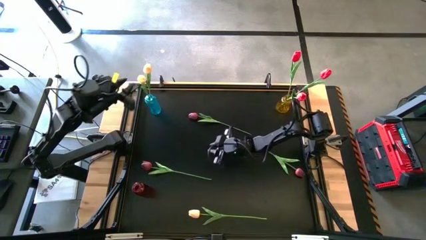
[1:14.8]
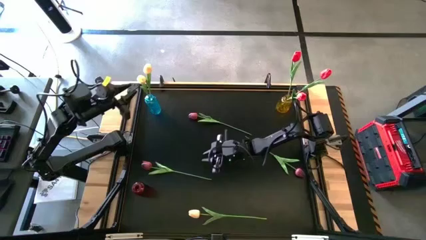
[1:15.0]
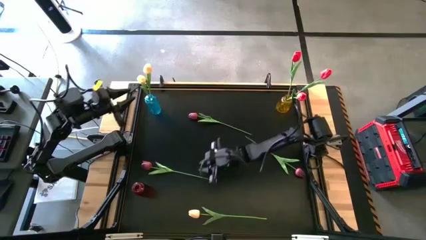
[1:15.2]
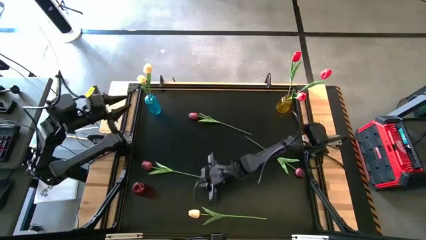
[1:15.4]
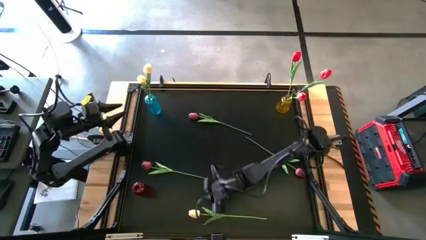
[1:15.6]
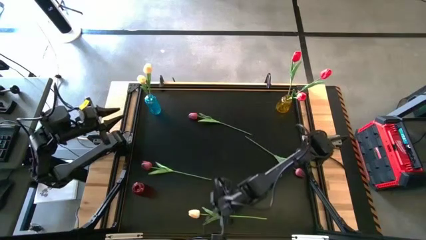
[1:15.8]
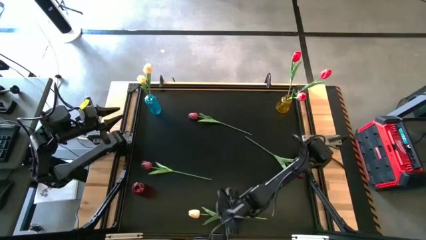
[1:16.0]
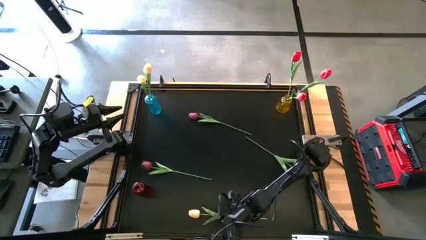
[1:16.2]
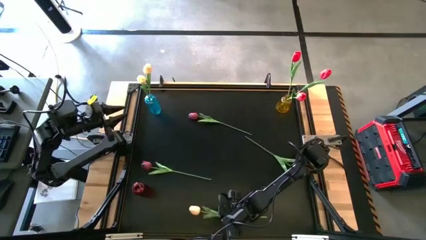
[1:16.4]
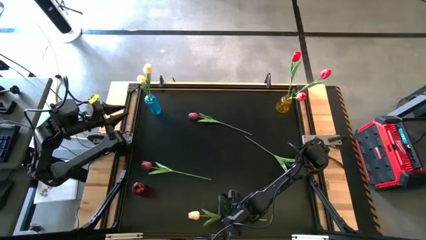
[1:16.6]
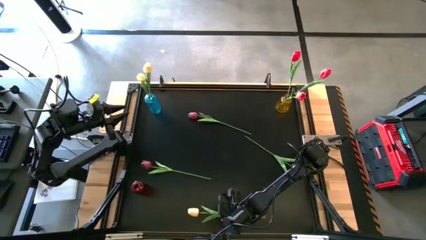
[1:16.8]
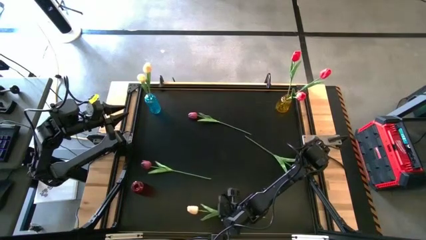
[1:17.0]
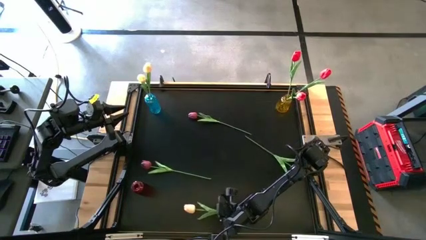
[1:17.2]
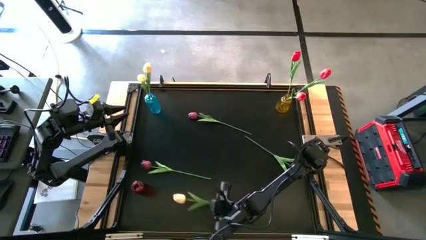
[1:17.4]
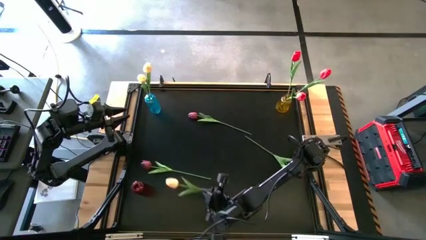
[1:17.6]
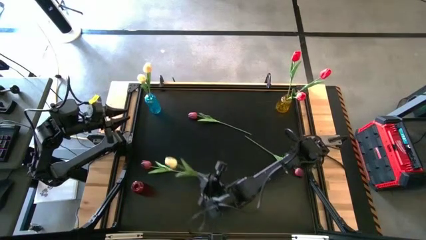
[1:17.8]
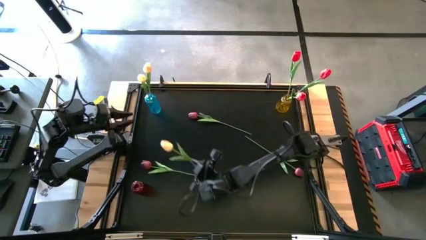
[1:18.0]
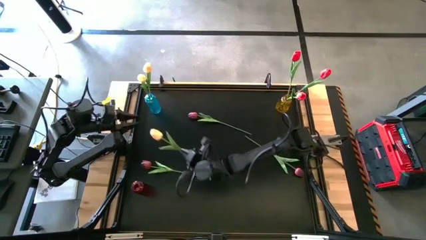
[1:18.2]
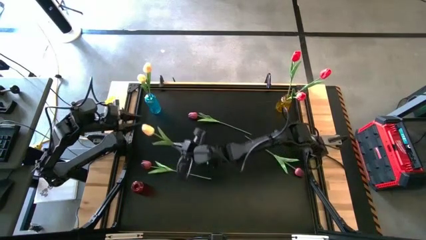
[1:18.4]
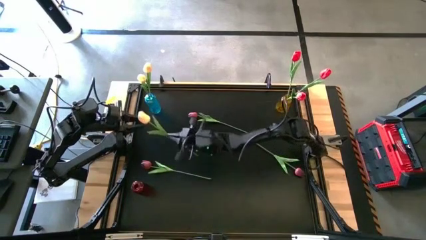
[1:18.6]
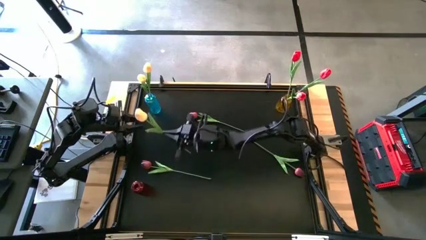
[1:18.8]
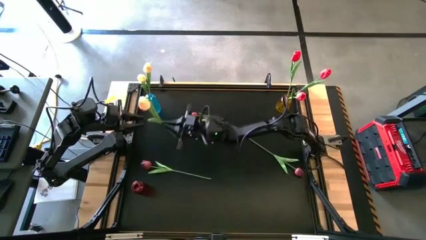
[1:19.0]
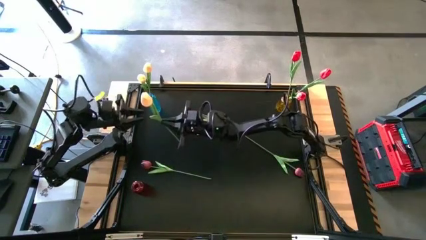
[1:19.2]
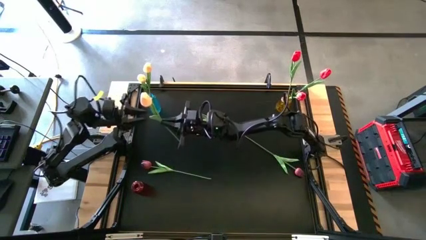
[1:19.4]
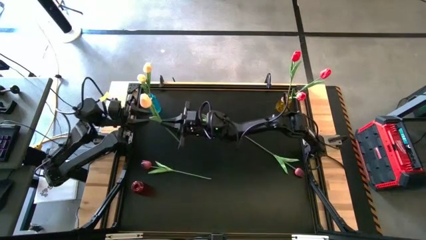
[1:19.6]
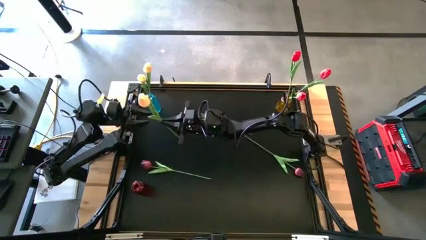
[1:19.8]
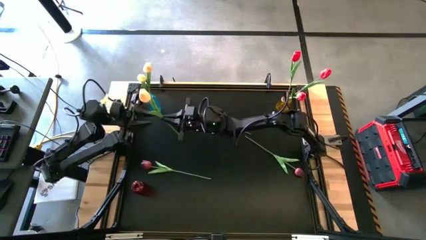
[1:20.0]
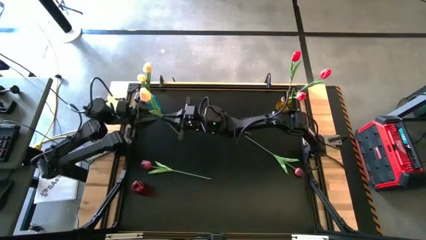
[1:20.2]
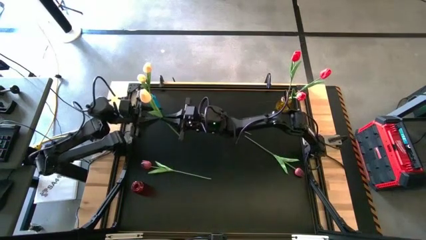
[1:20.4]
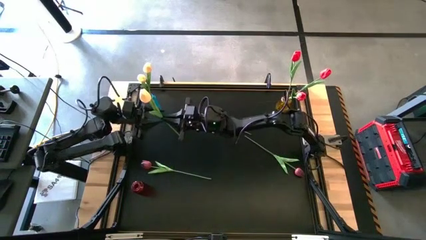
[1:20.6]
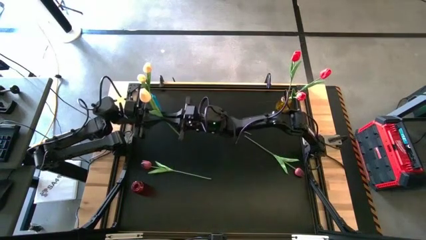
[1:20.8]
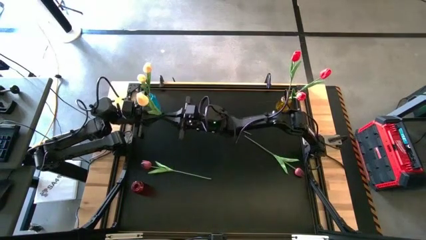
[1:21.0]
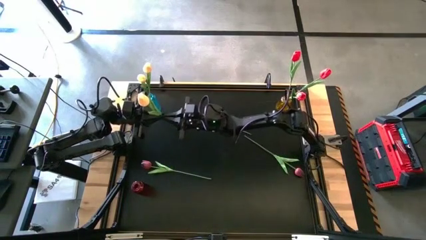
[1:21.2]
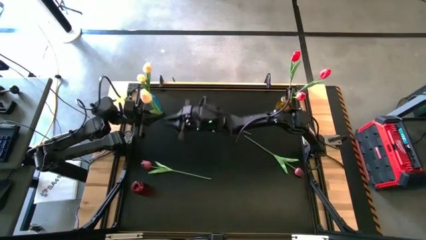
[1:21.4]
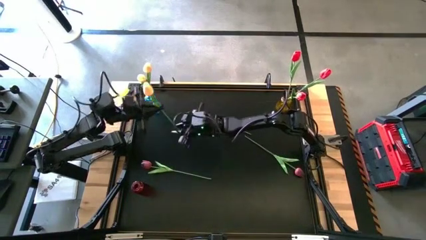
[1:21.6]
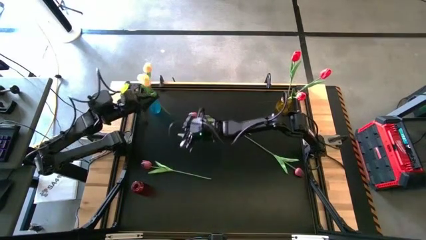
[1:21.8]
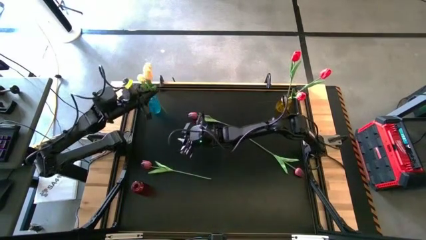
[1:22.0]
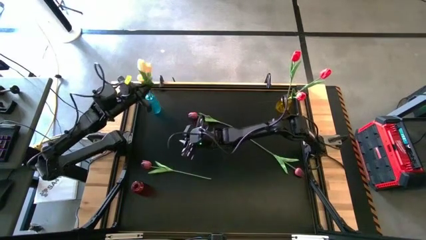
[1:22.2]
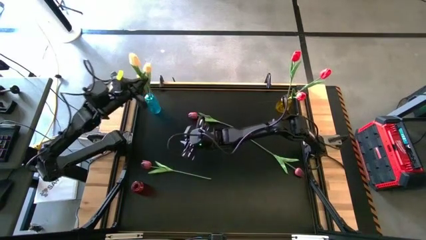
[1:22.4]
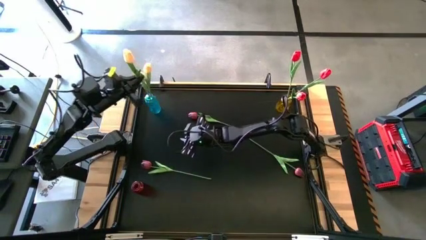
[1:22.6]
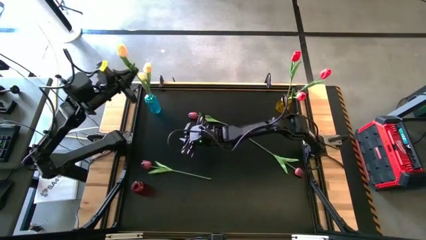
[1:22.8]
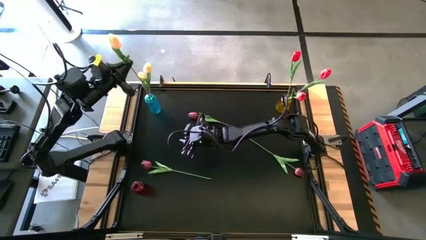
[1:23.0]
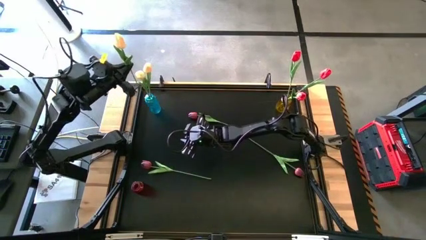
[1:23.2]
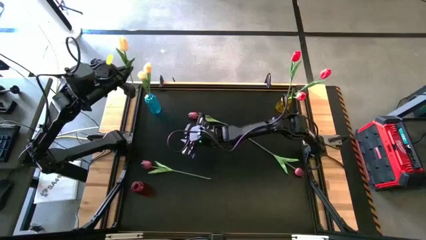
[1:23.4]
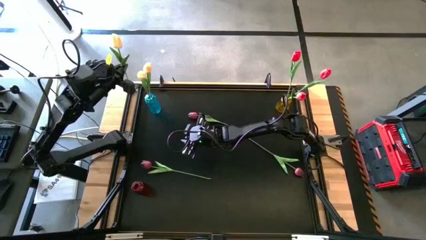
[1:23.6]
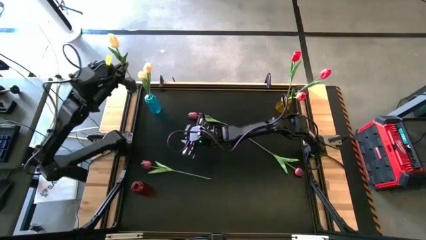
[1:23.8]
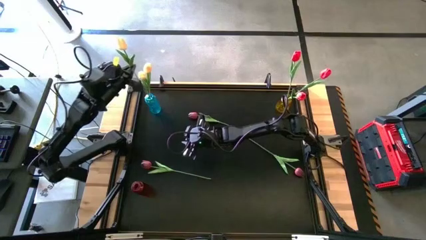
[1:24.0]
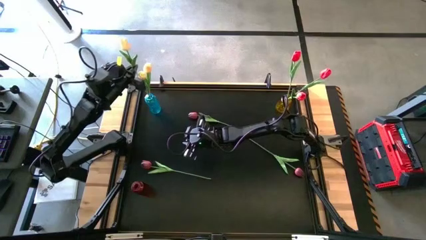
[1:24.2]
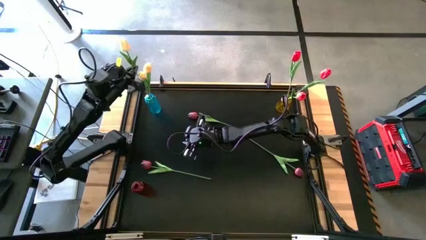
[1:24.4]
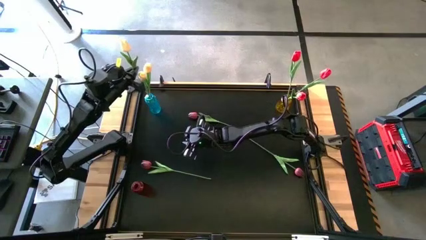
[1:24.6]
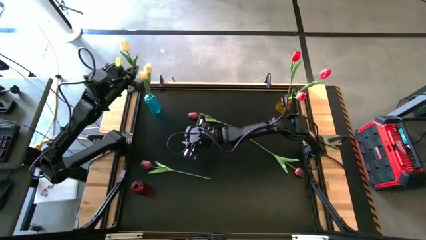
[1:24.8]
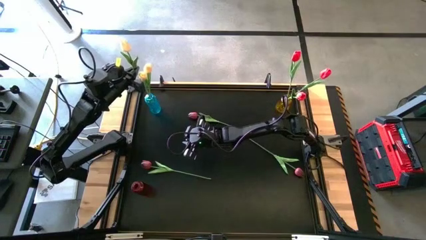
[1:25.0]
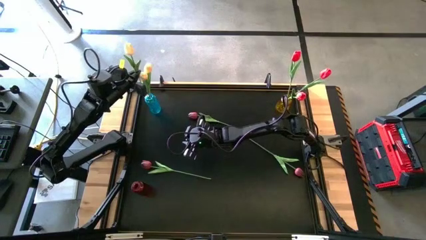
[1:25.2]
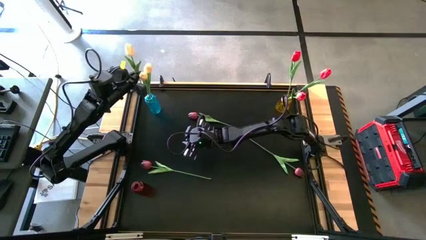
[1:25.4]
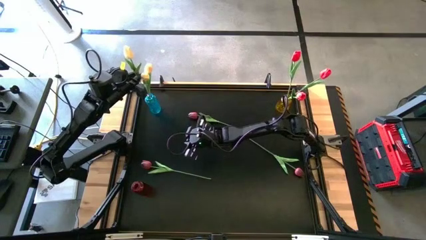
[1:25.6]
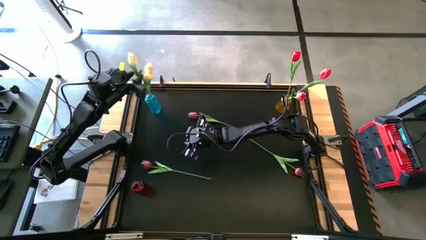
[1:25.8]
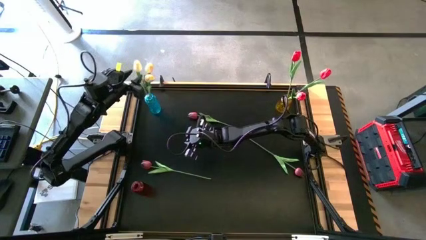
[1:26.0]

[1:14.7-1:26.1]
Task: Sort flowers into vase by color
Put the white tulip into the blue vase

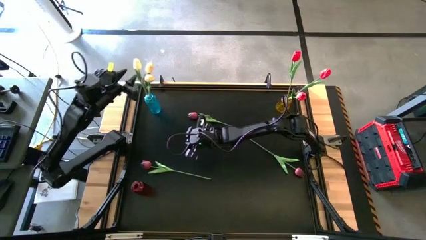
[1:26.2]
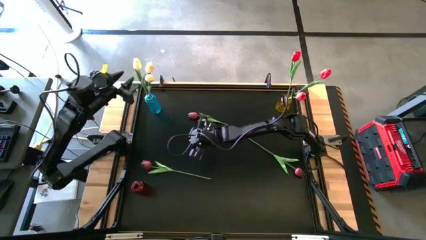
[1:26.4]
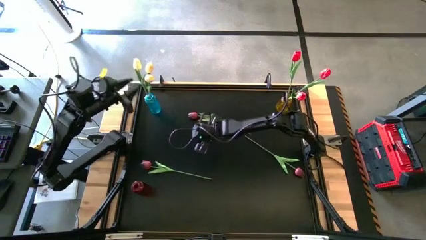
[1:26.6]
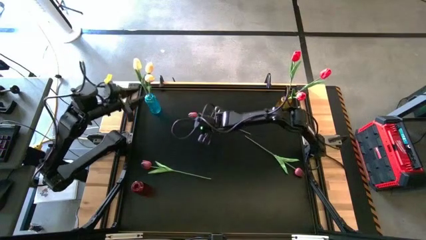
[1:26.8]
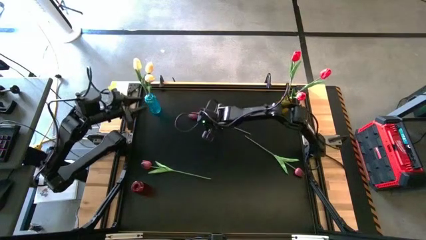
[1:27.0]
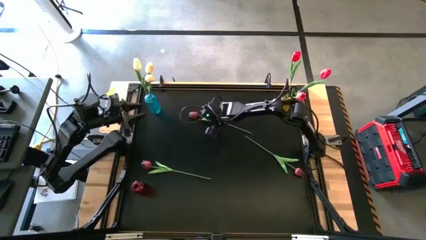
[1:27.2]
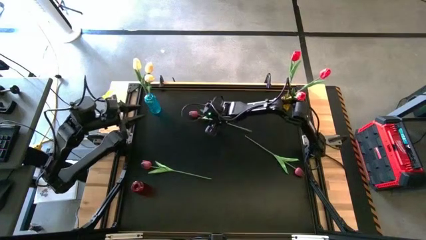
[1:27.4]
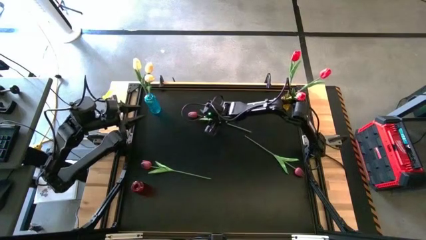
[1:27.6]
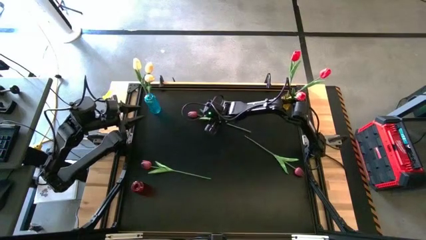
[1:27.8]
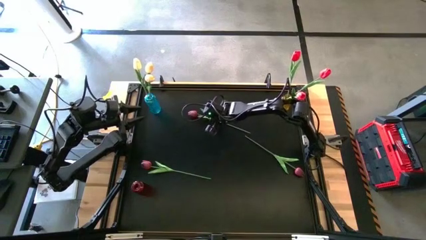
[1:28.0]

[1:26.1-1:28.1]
Put the top dark red tulip into the red vase
